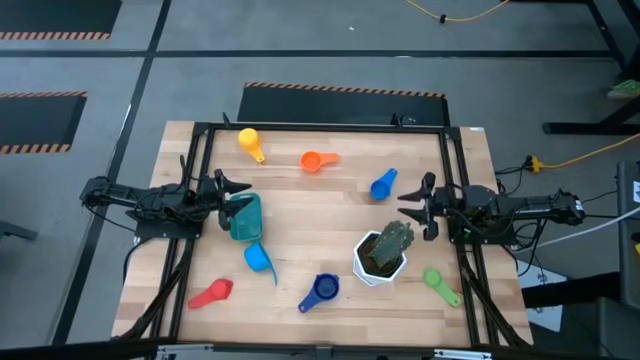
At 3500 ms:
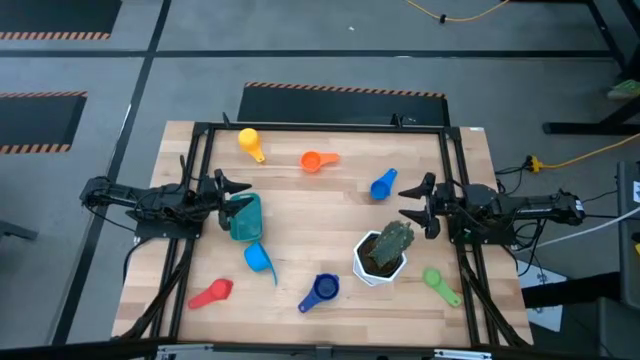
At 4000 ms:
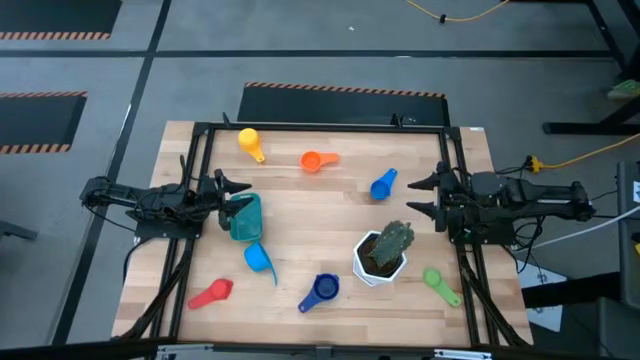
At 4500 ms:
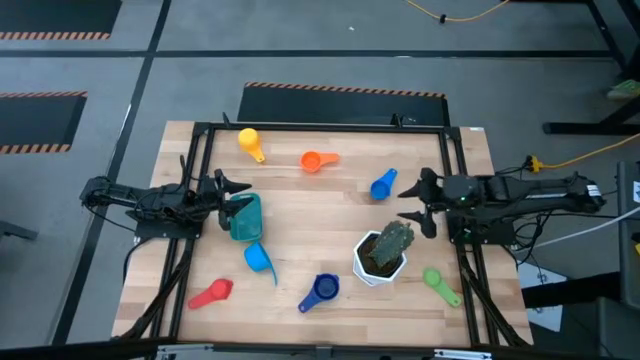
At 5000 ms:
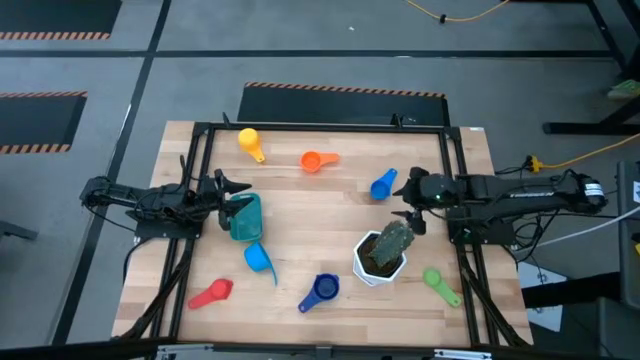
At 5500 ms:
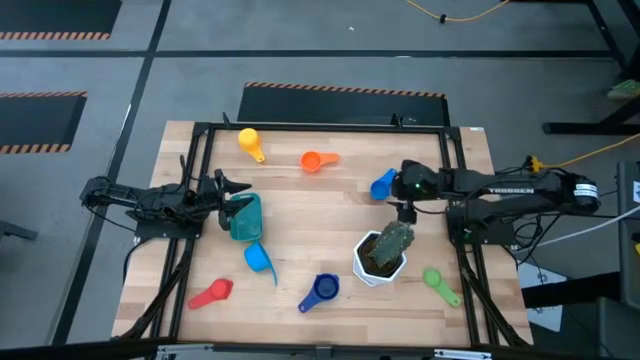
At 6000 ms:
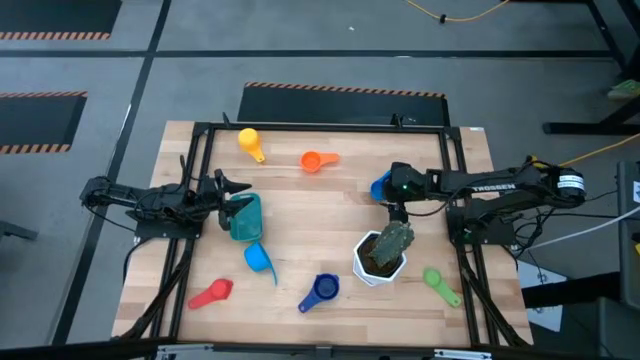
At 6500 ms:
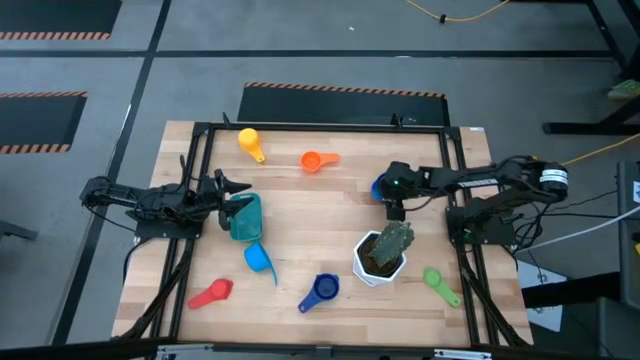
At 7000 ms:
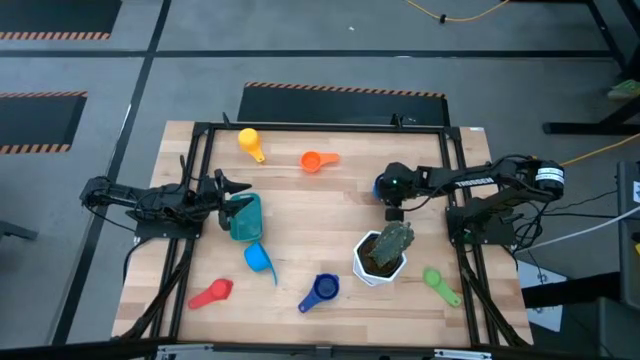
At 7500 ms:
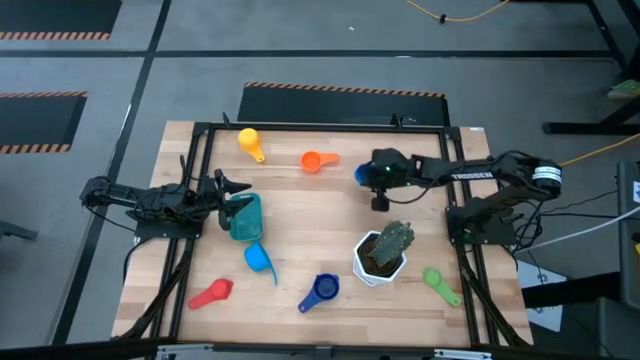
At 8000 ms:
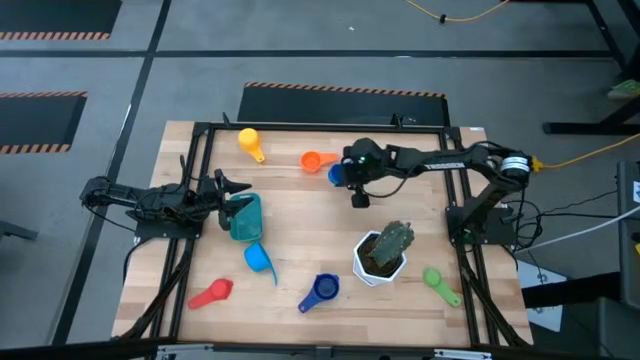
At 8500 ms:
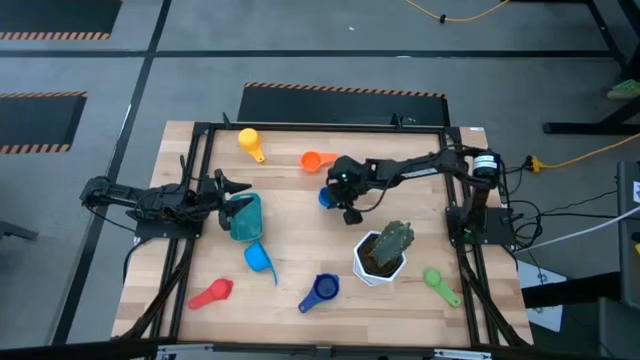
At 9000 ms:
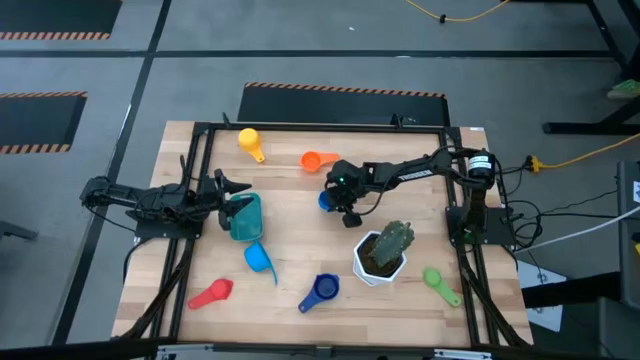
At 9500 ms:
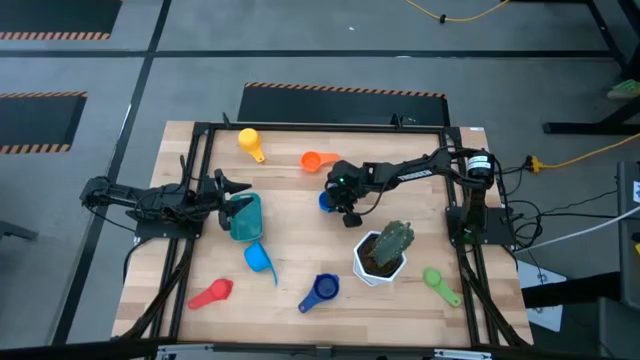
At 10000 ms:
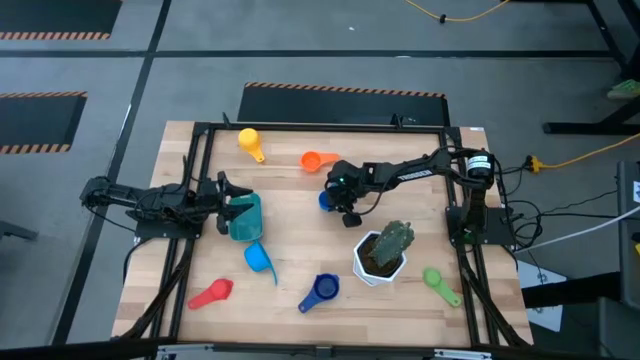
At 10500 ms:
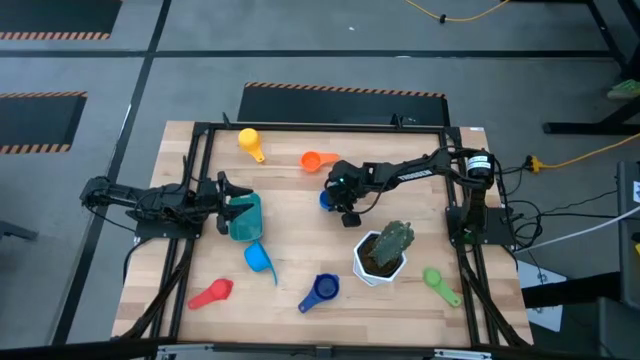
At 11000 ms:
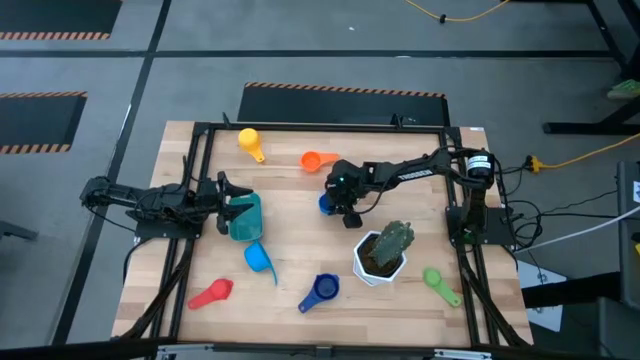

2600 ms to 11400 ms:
Task: Nest measuring cups in basket
Adjust the blue measuring cup

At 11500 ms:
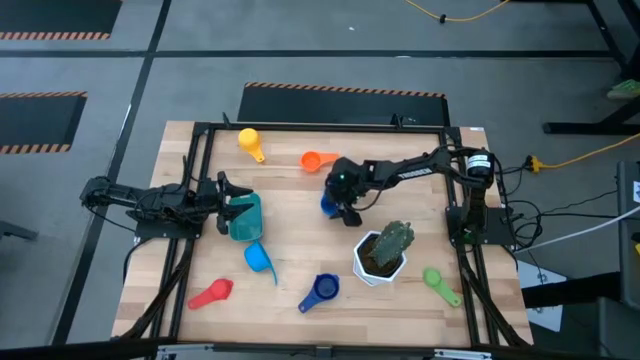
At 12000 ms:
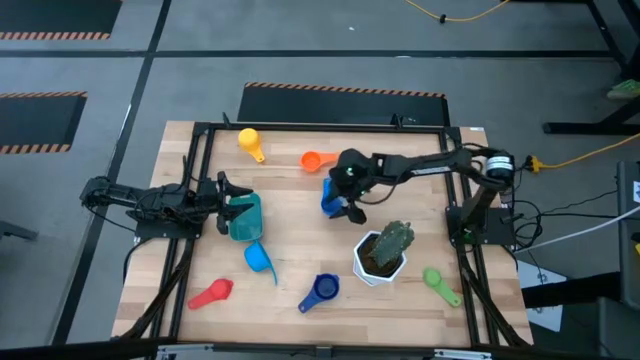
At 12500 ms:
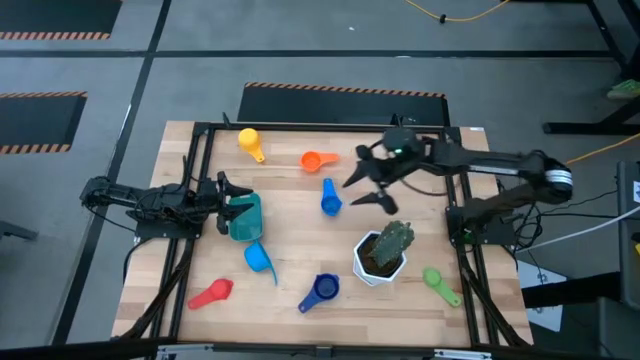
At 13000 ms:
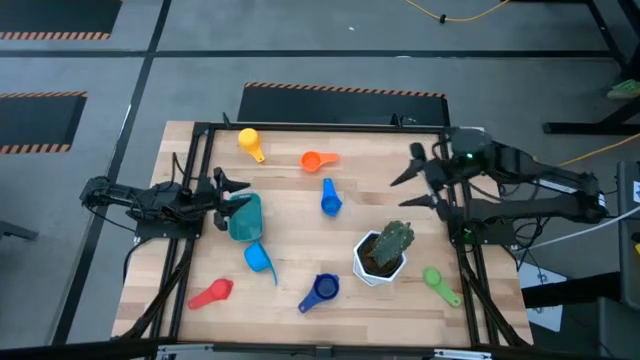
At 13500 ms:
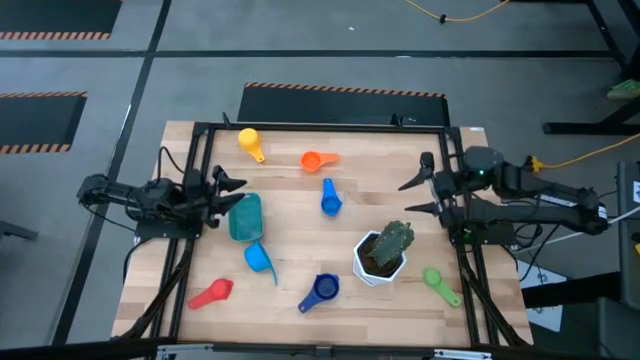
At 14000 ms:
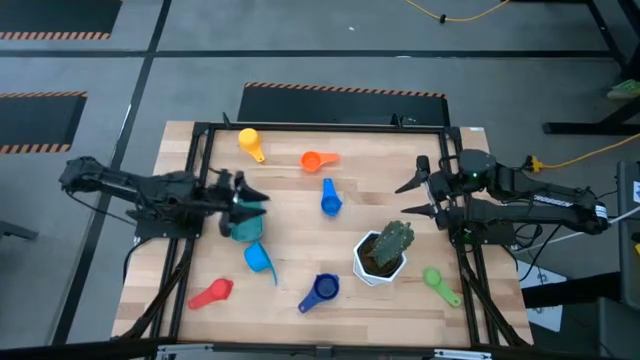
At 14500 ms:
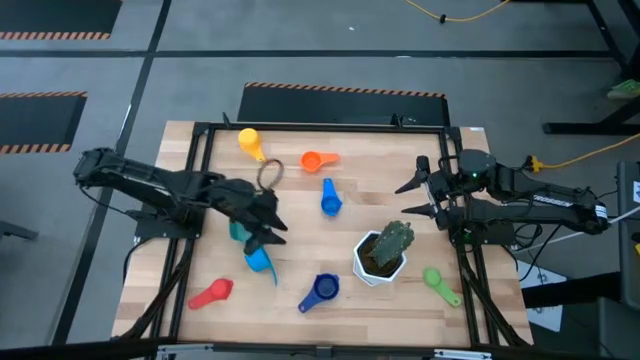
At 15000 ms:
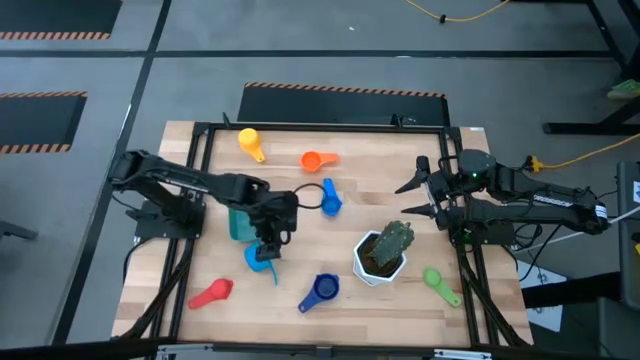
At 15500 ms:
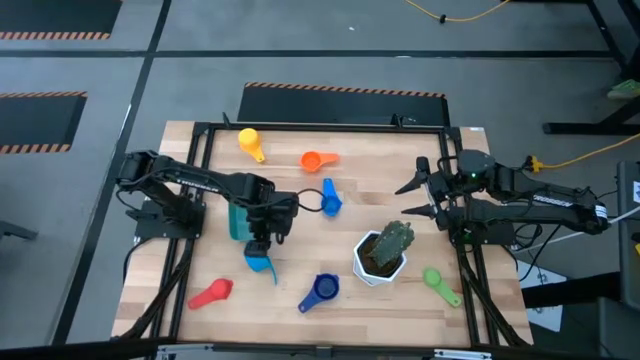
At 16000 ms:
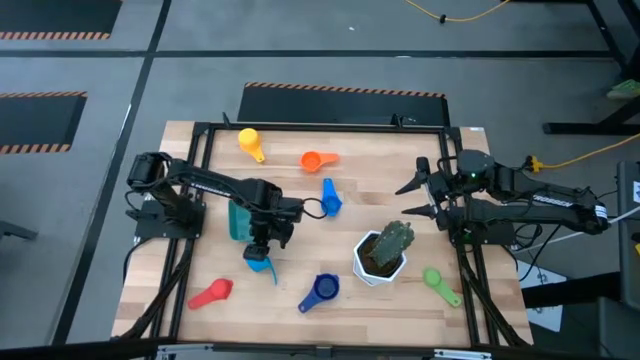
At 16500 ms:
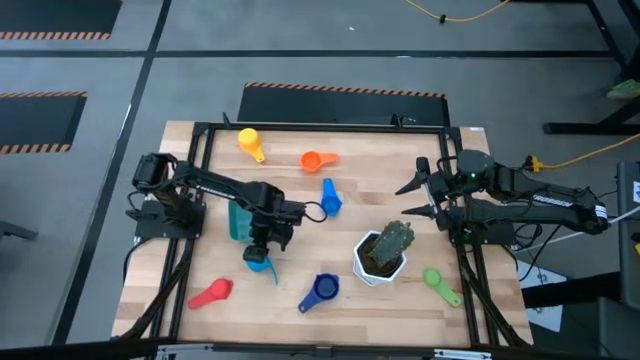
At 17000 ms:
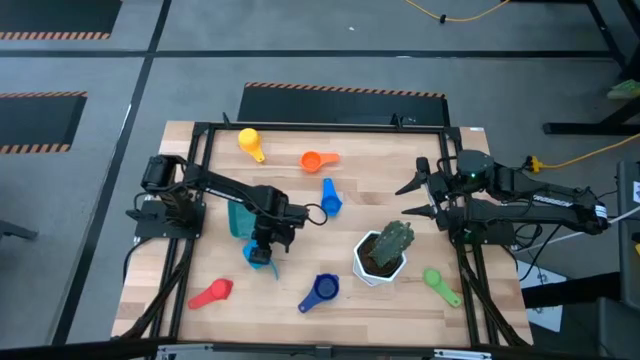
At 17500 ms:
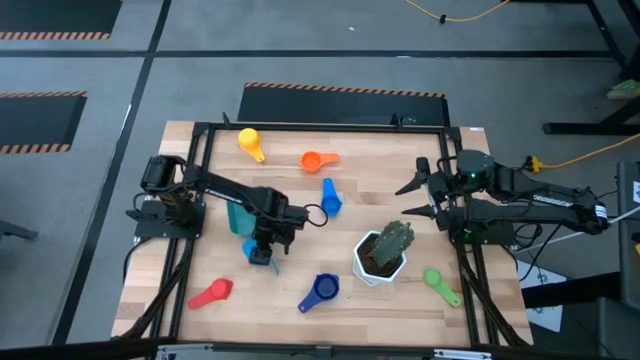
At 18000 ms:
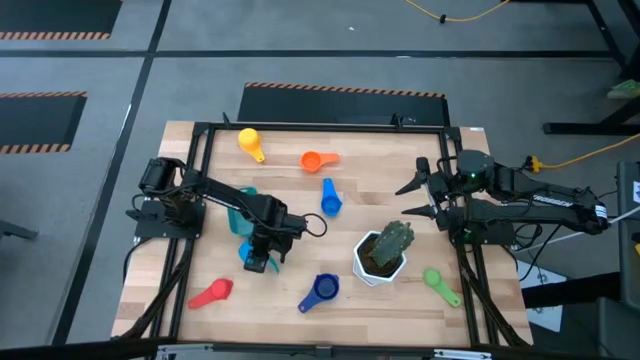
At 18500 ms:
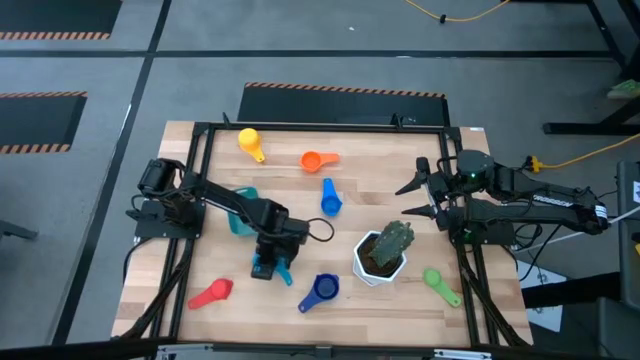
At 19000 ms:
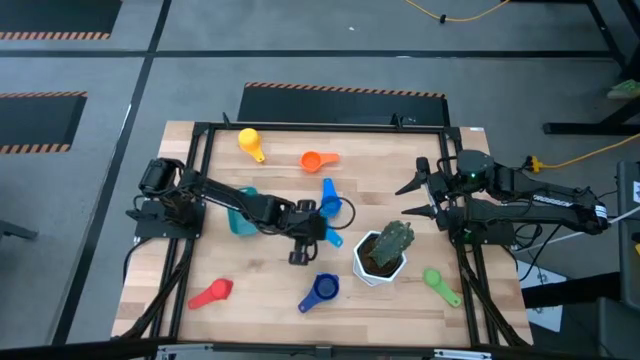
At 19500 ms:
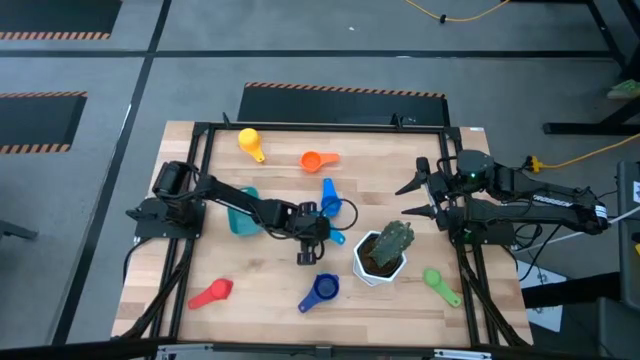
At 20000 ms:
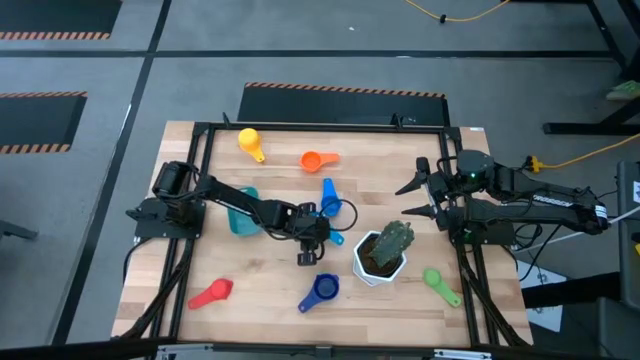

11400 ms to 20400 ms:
Adjust the light blue measuring cup

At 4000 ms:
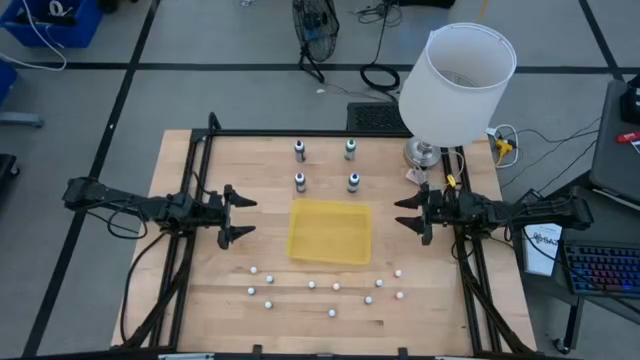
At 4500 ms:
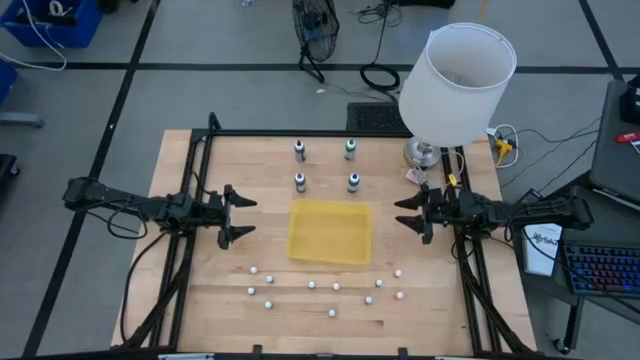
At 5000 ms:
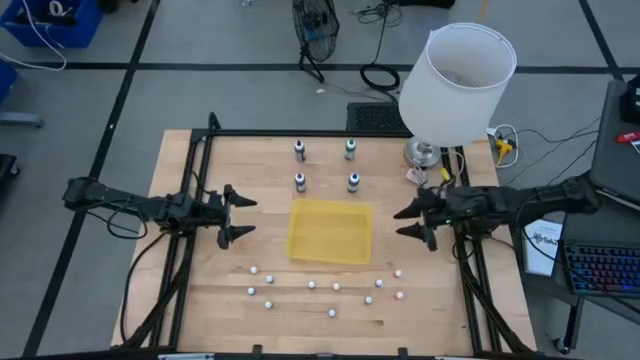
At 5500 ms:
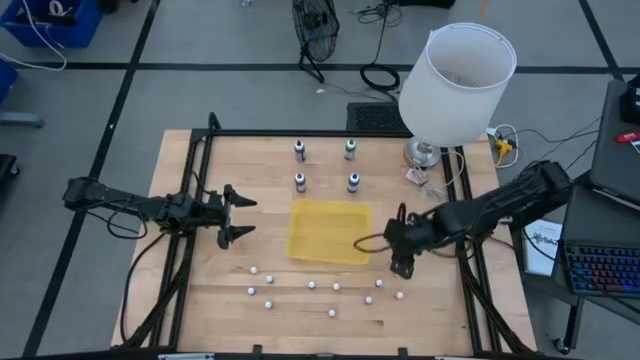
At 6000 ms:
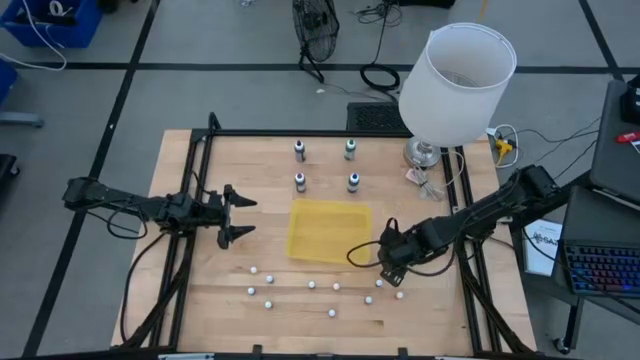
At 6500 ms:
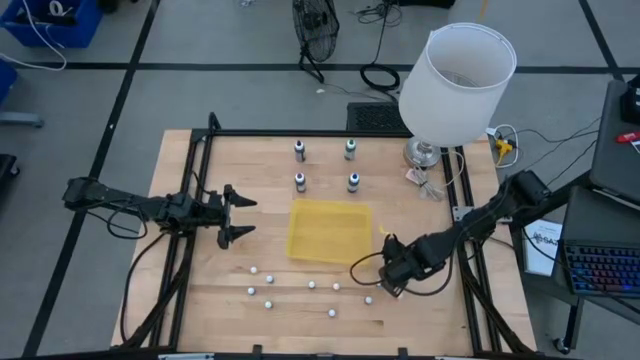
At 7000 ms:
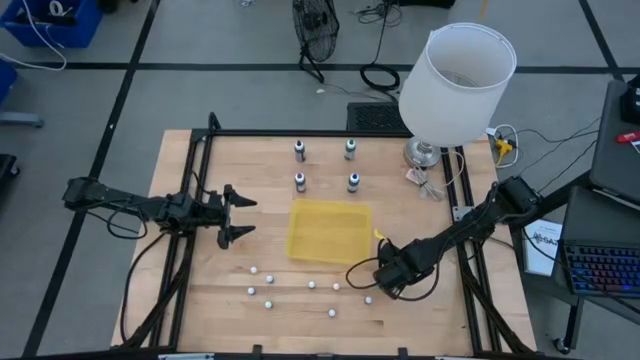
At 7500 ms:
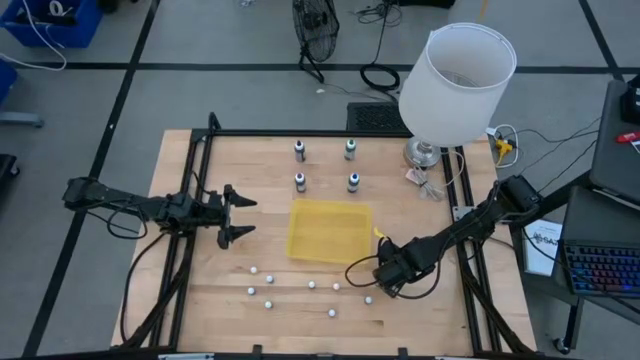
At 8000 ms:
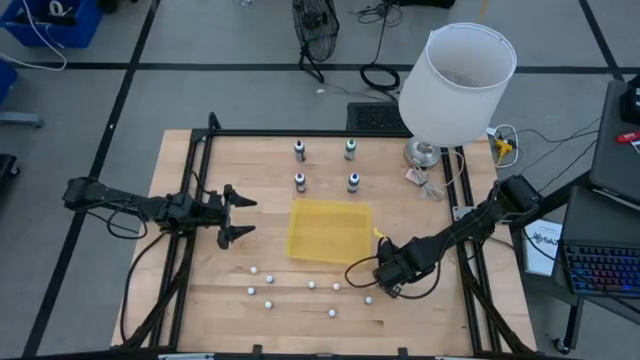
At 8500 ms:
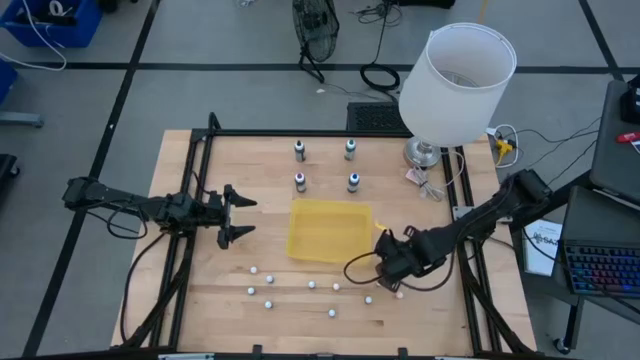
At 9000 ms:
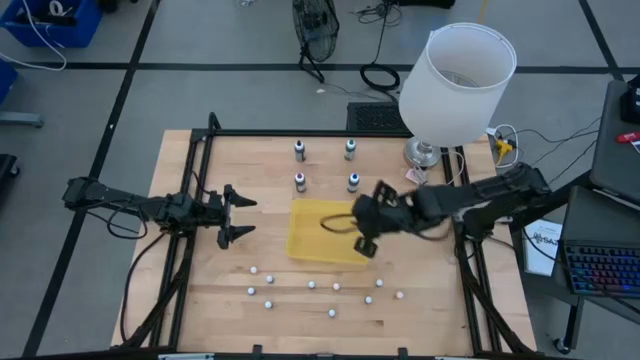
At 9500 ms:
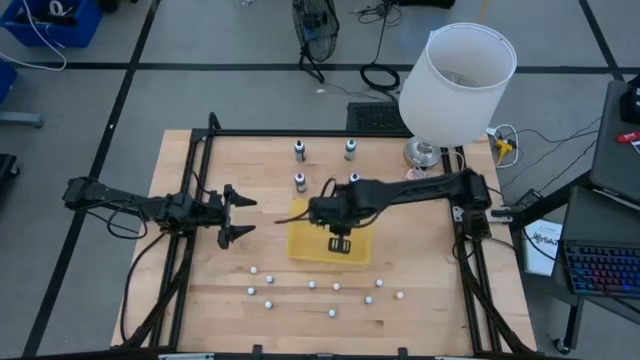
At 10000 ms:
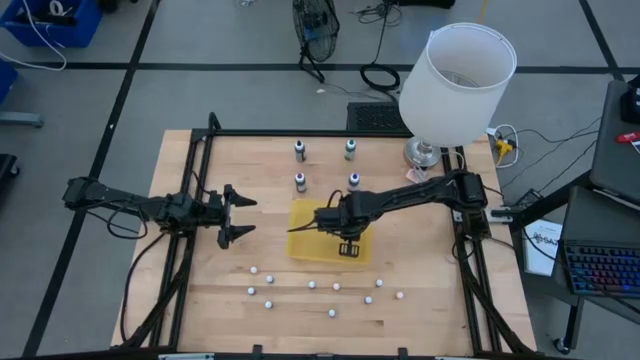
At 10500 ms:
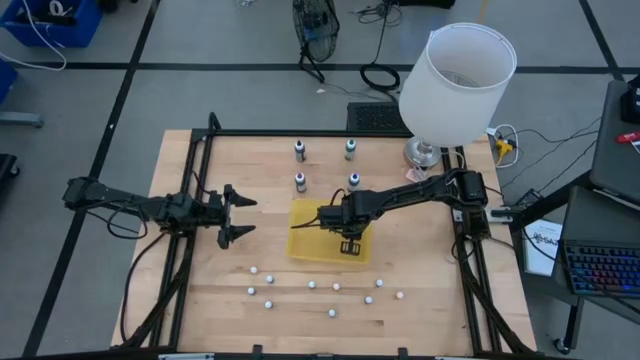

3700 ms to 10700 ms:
Task: Pick & Place food coloring
Put the yellow food coloring bottle into the yellow container
